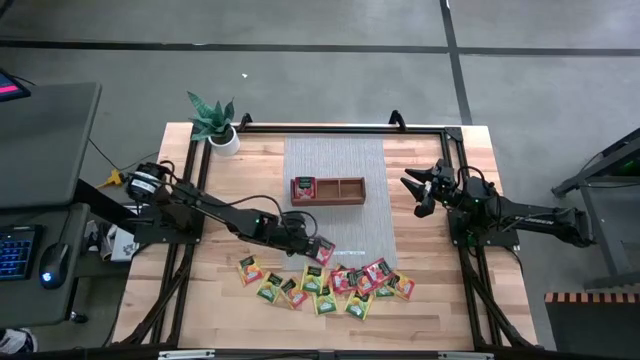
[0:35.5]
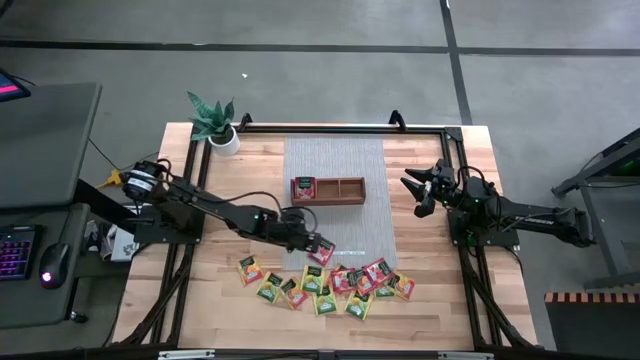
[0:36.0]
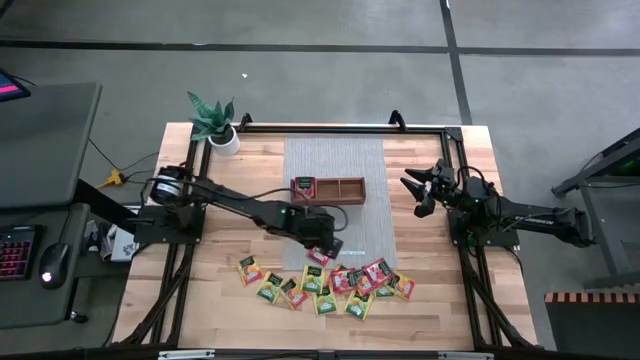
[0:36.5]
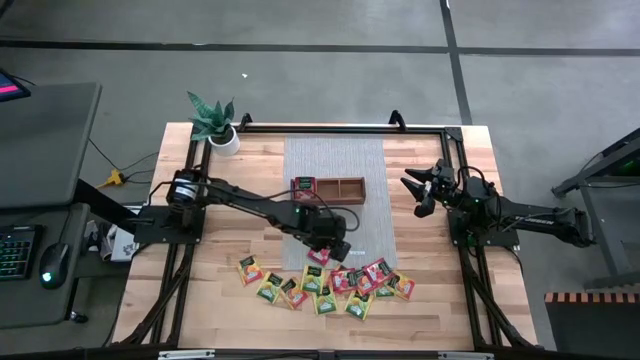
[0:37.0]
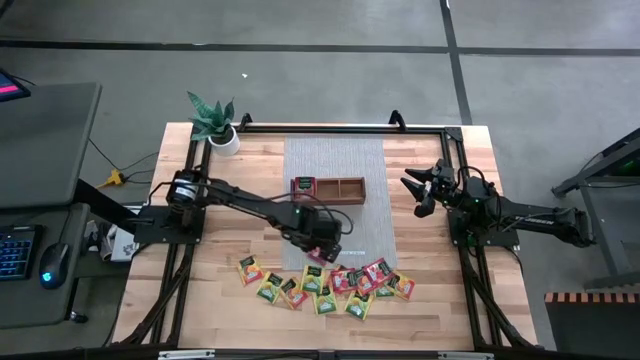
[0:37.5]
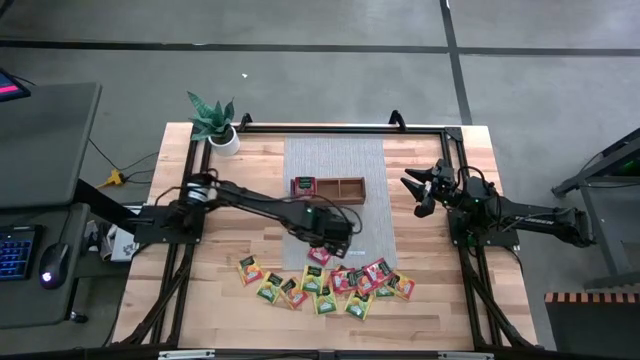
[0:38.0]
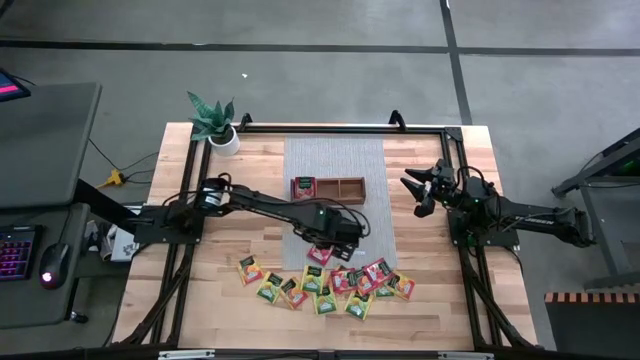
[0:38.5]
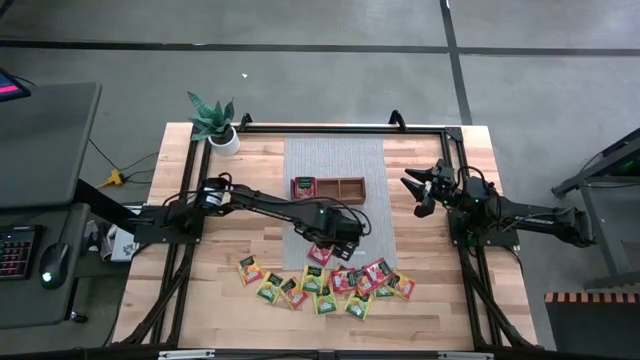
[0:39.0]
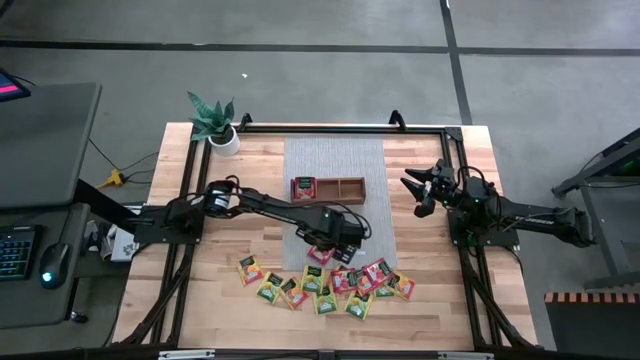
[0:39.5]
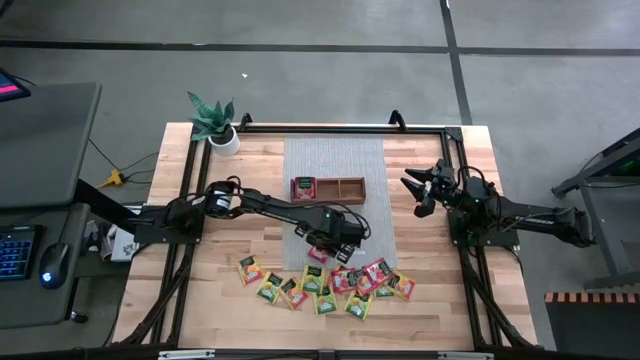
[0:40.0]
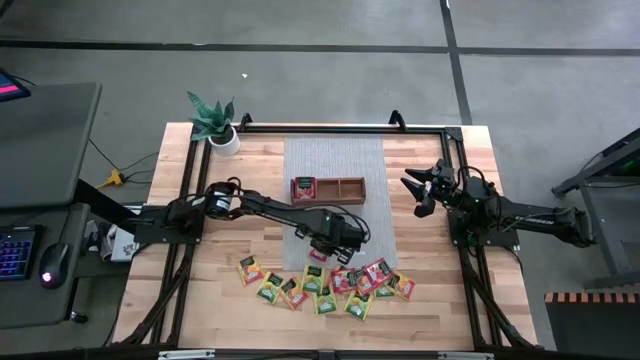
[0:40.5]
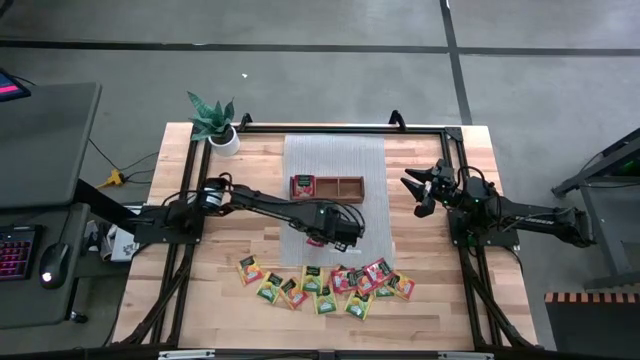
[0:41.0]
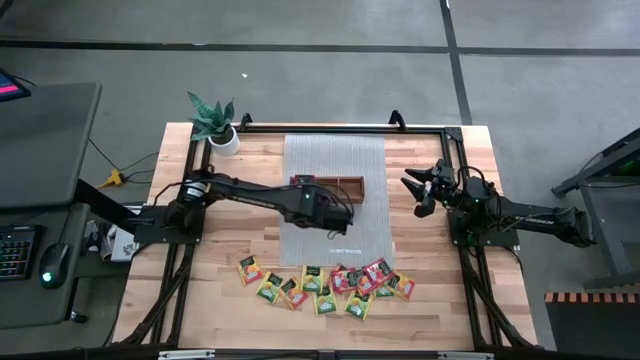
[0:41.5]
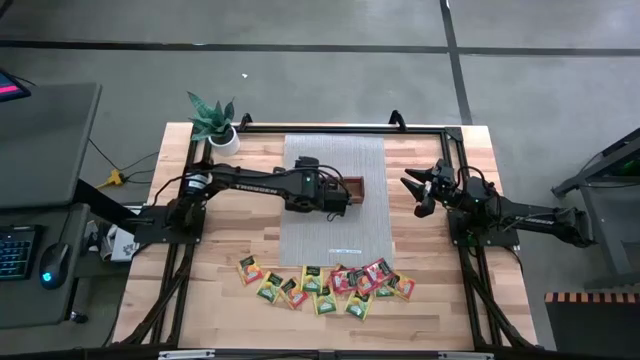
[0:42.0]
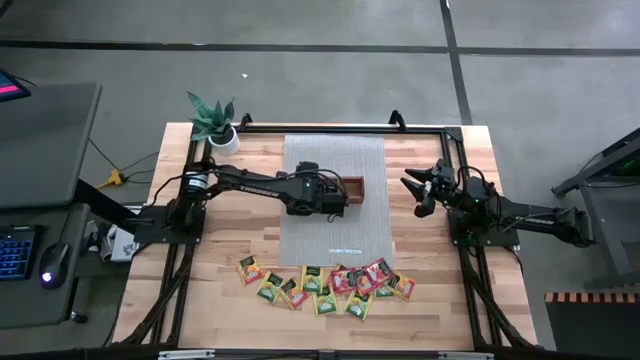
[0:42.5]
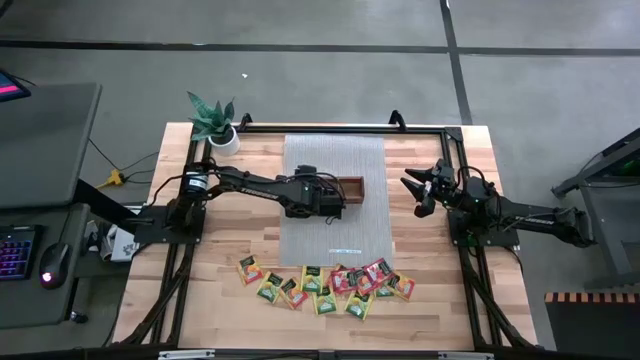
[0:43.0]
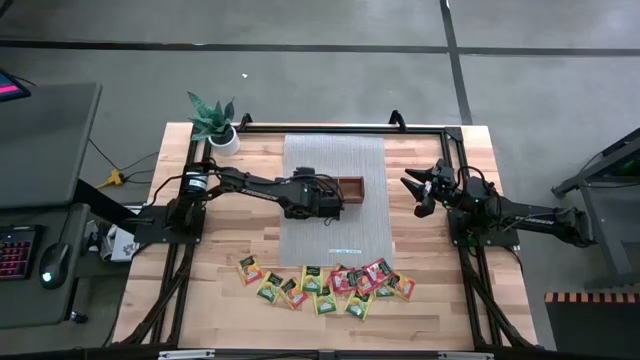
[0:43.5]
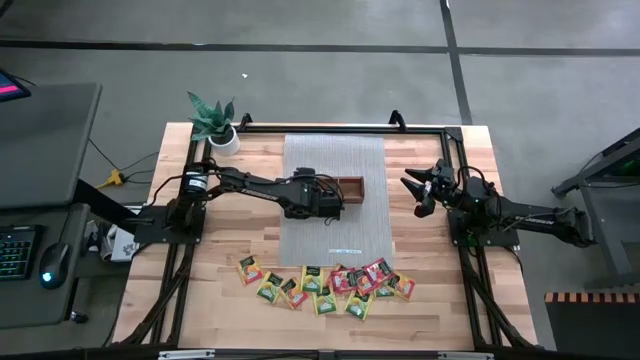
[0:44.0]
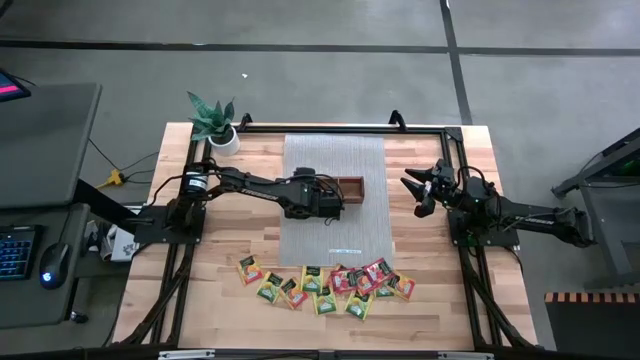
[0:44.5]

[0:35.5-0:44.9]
Task: Pick & Place Tea
Put the red tea bag into the left section of the wooden organizer

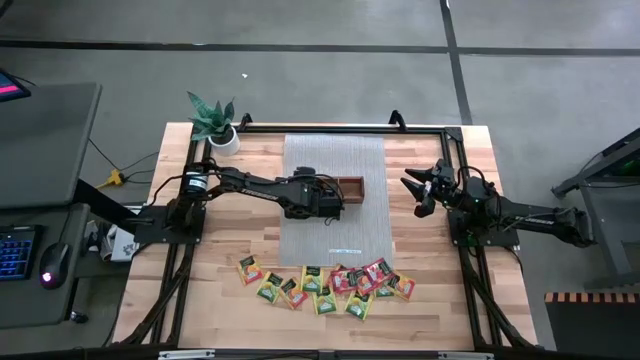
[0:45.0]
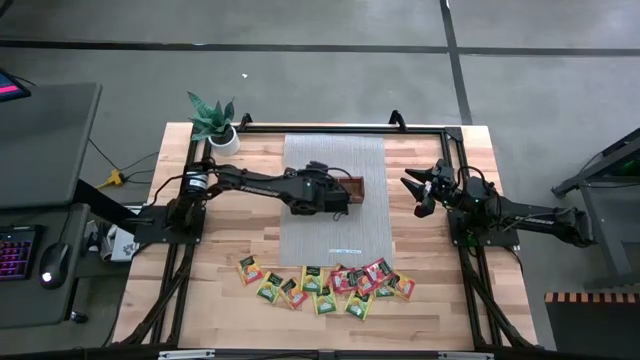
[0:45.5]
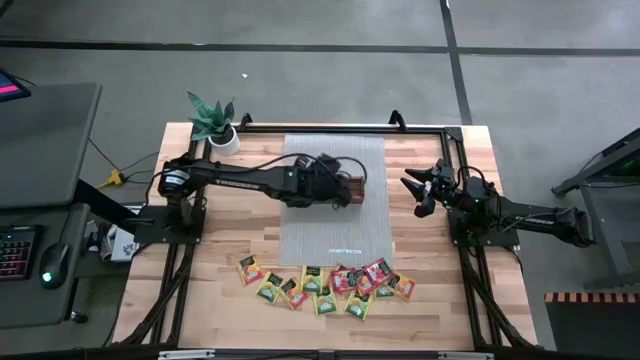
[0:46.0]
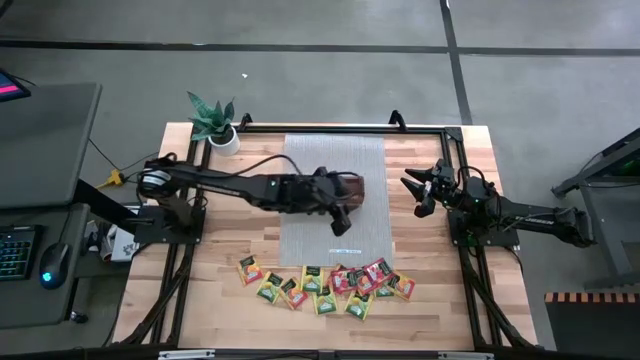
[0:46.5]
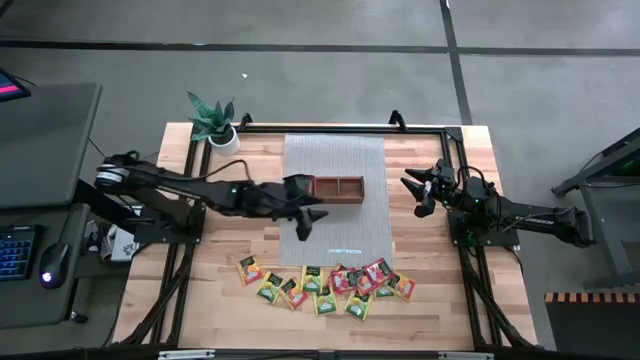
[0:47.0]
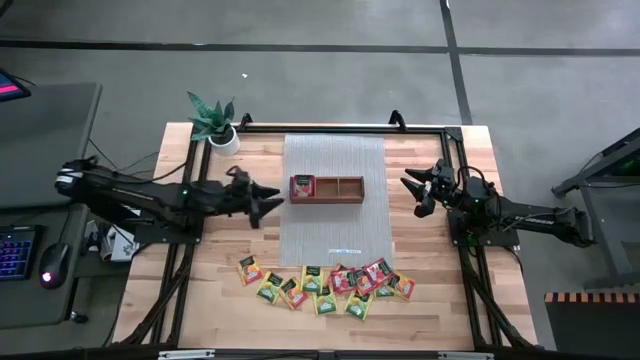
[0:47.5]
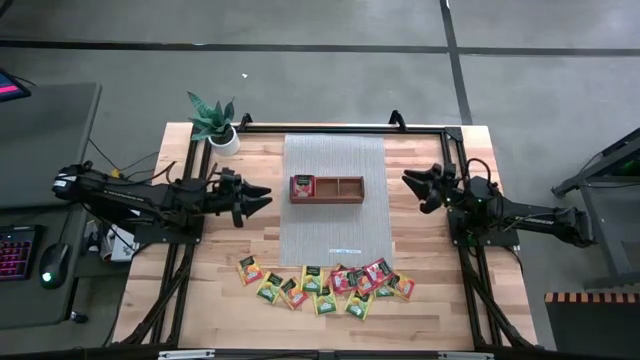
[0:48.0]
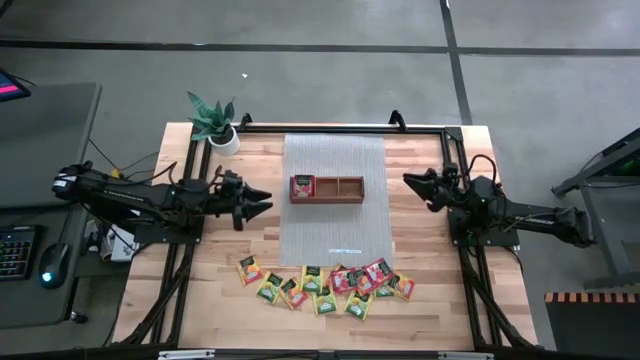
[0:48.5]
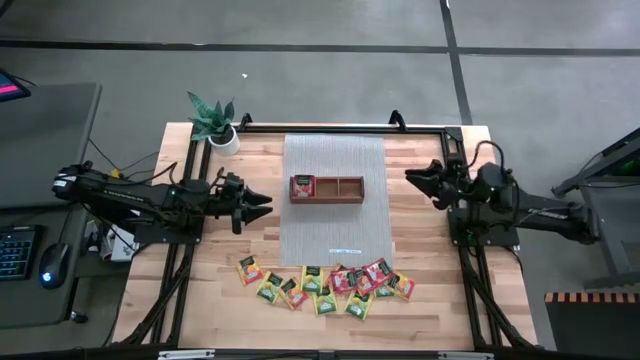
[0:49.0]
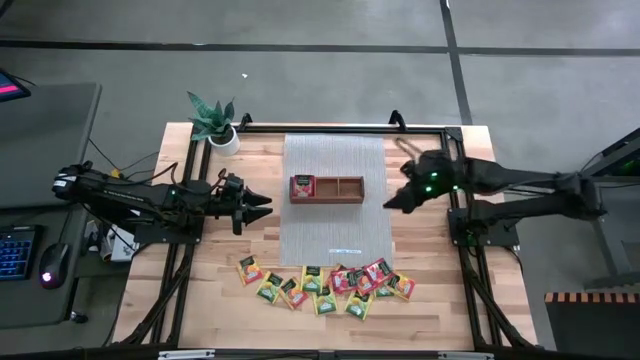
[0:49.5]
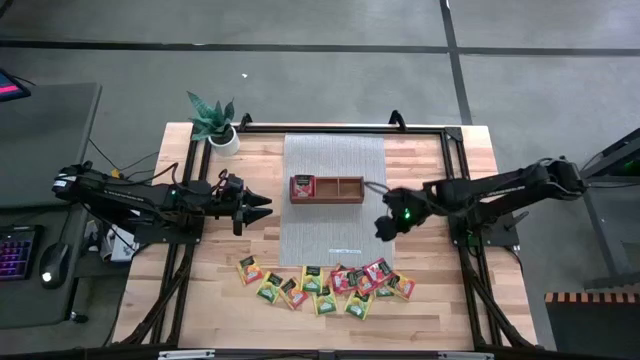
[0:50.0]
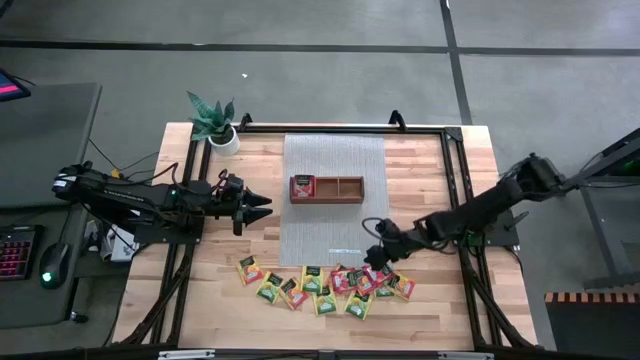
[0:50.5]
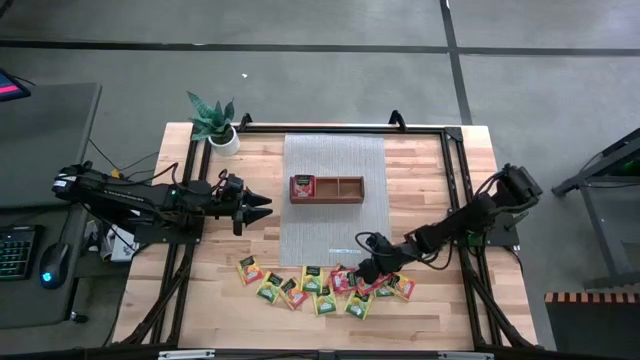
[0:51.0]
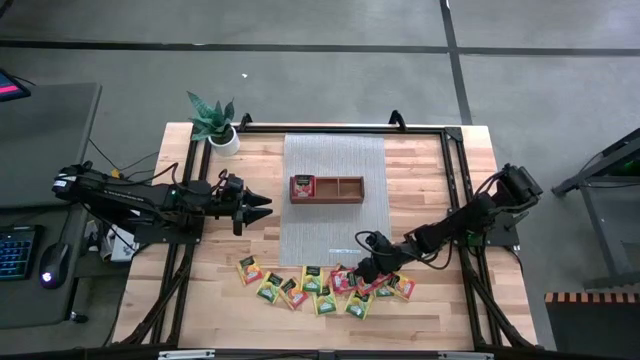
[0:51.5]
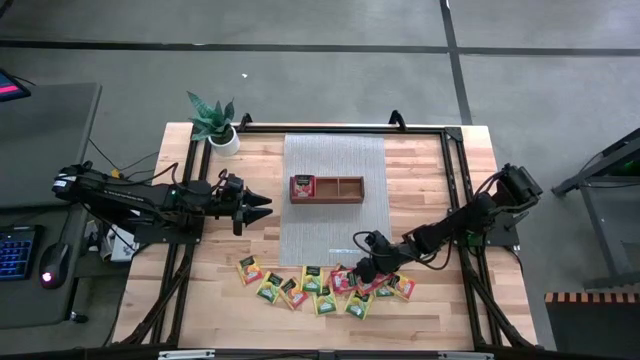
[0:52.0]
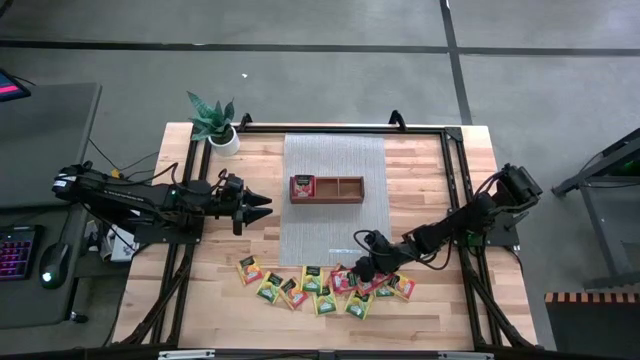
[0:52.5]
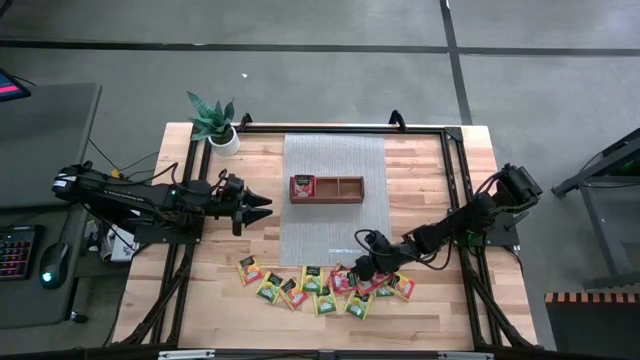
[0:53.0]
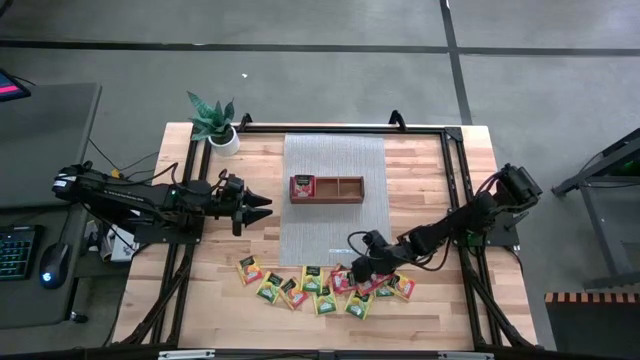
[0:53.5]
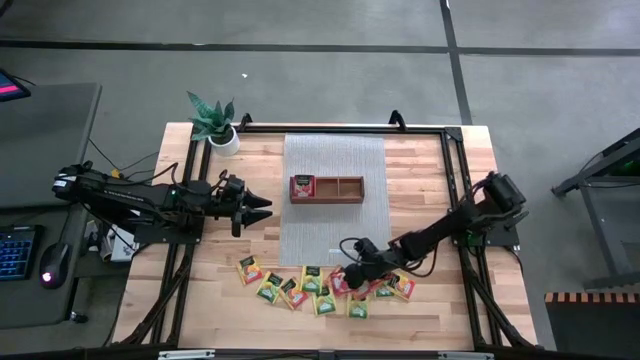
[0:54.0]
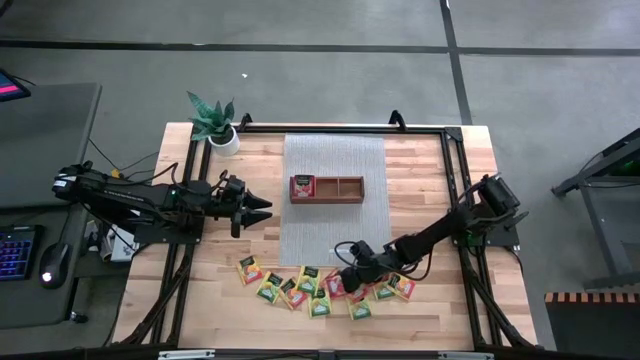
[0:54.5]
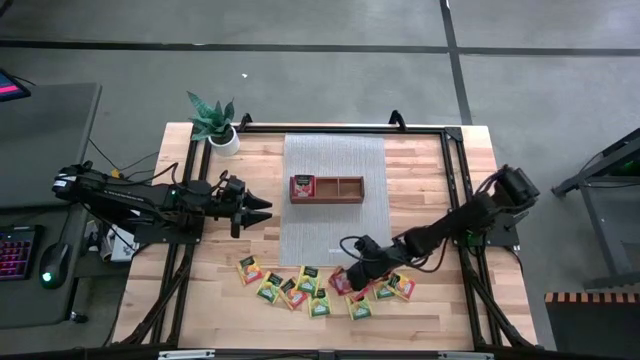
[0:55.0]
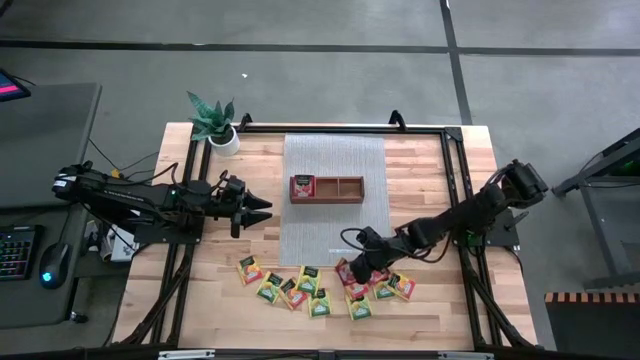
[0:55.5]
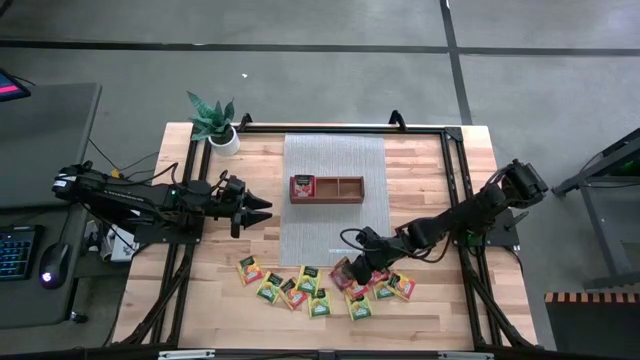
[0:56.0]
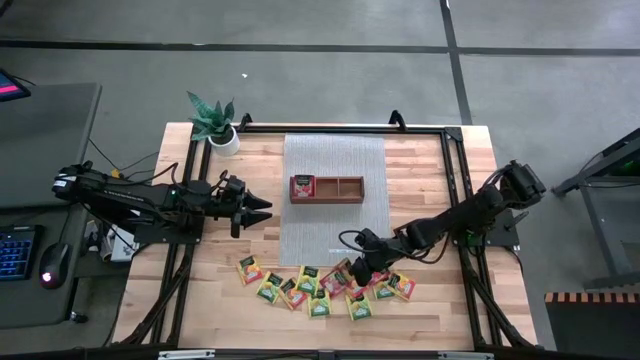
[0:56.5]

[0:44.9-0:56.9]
Put the red tea bag into the left section of the wooden organizer
